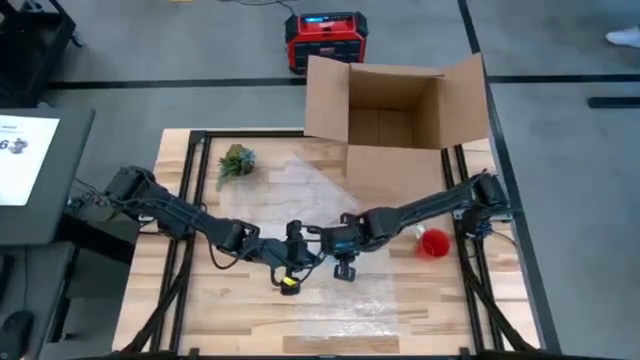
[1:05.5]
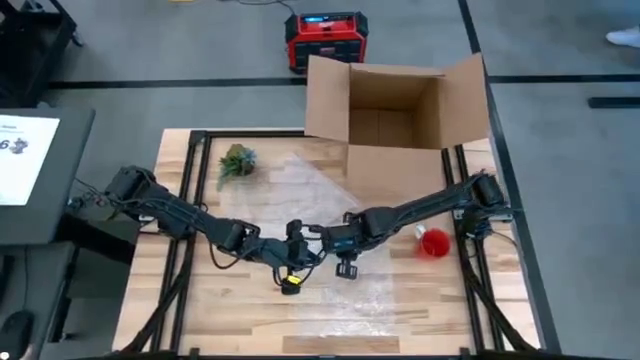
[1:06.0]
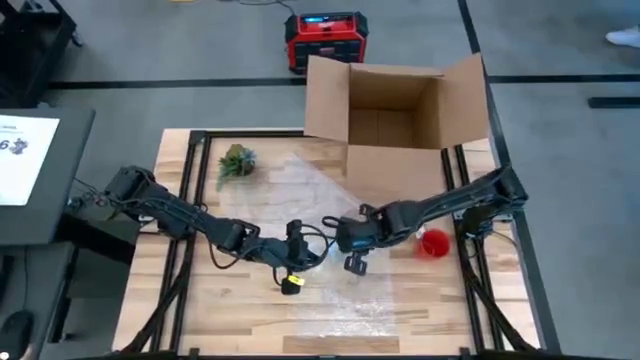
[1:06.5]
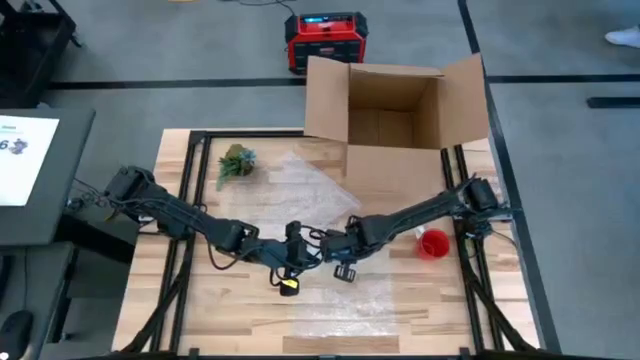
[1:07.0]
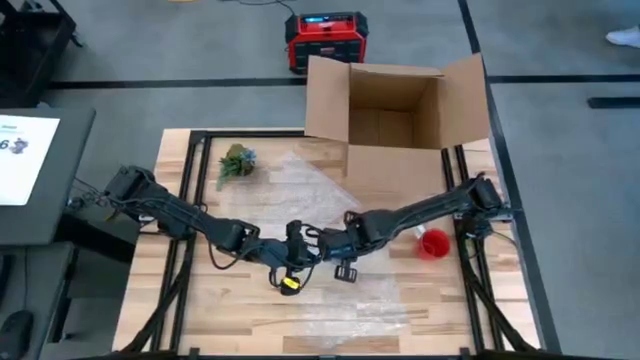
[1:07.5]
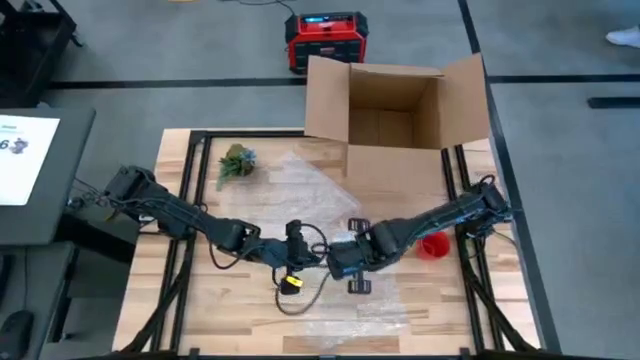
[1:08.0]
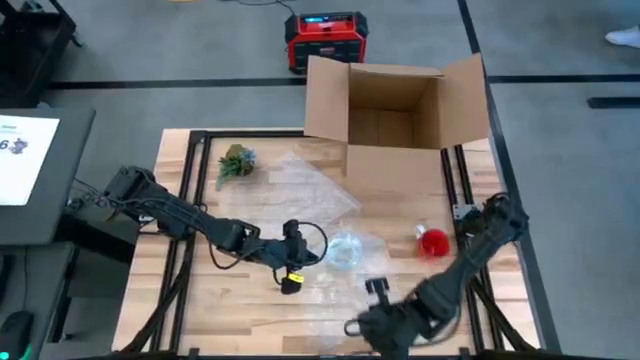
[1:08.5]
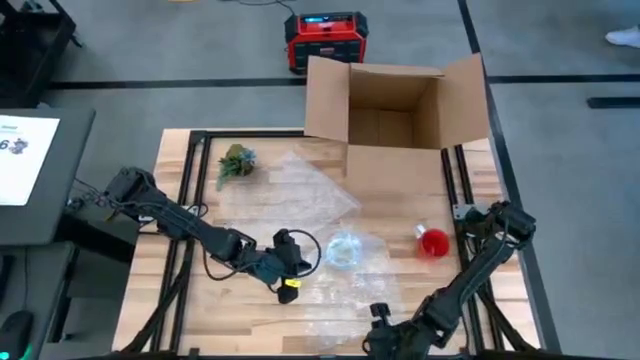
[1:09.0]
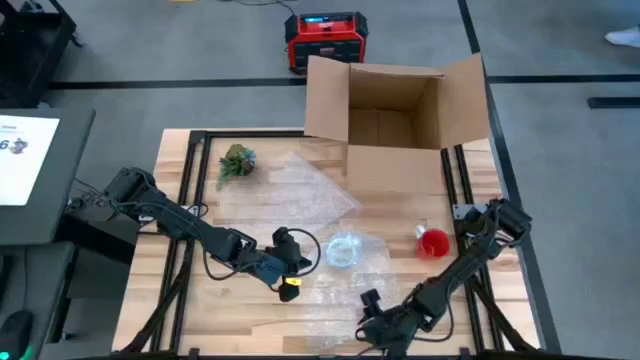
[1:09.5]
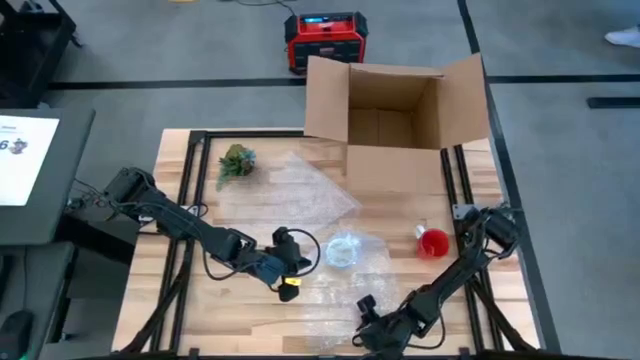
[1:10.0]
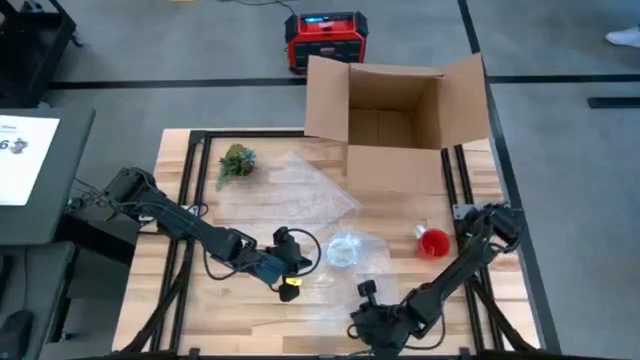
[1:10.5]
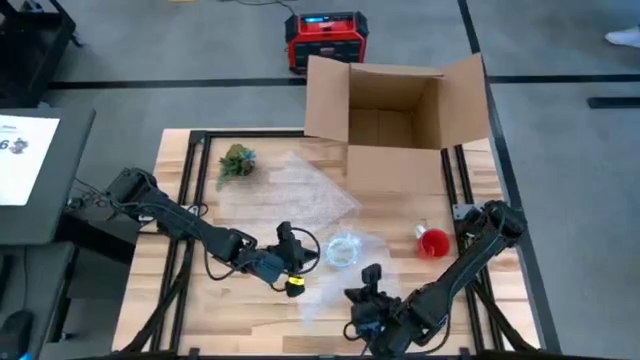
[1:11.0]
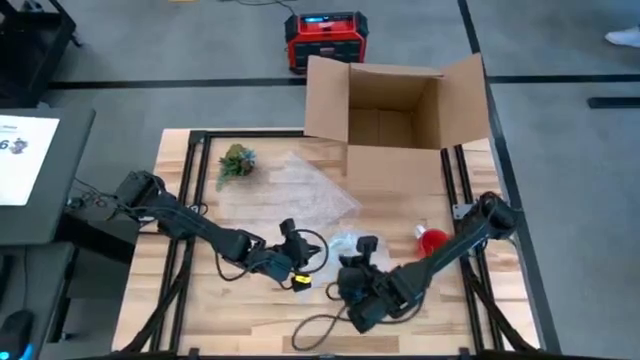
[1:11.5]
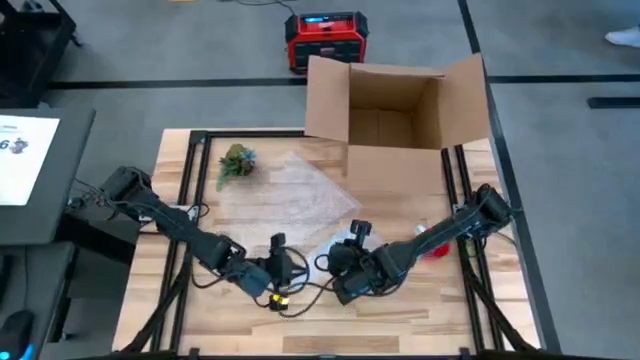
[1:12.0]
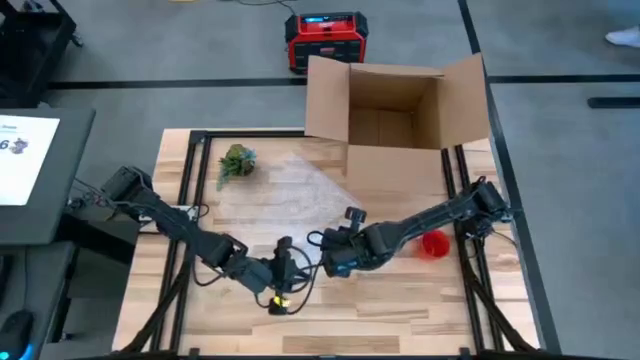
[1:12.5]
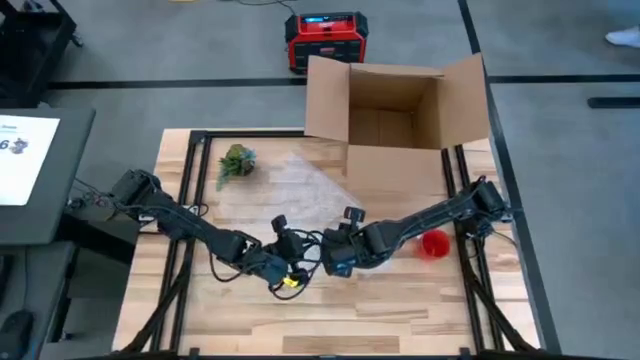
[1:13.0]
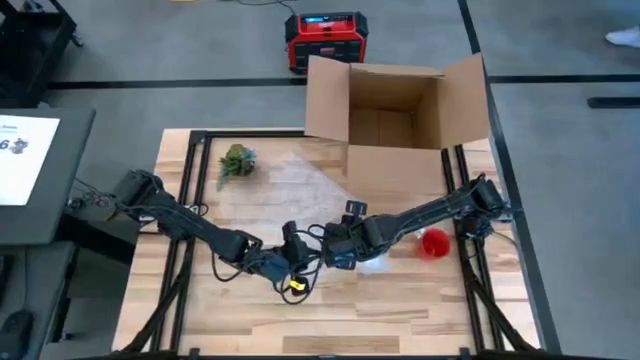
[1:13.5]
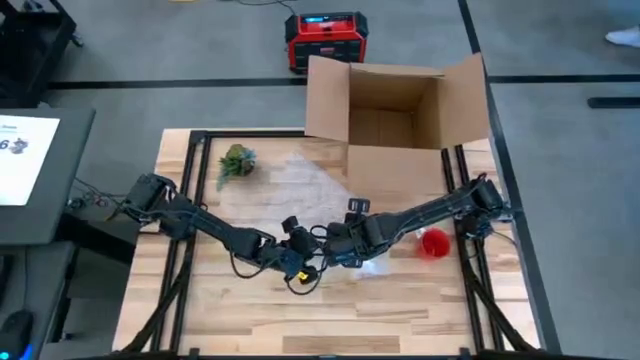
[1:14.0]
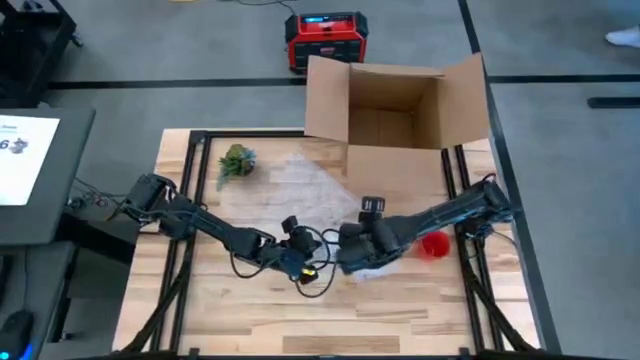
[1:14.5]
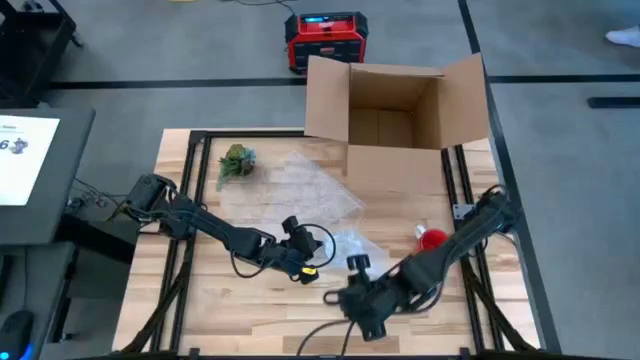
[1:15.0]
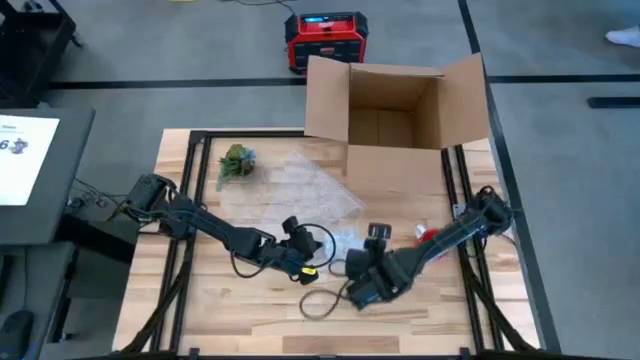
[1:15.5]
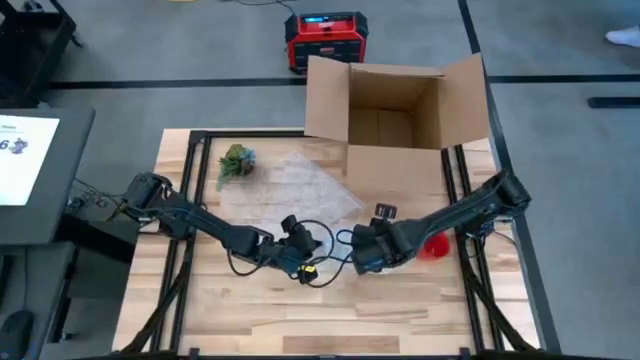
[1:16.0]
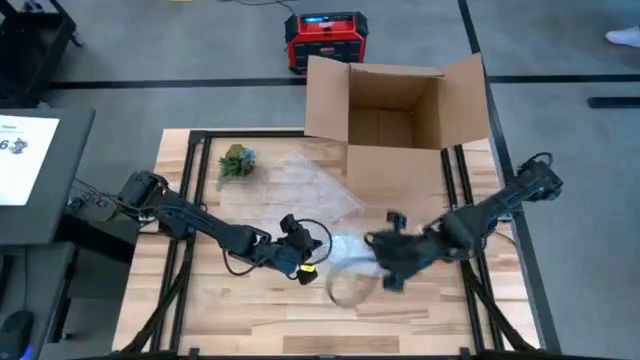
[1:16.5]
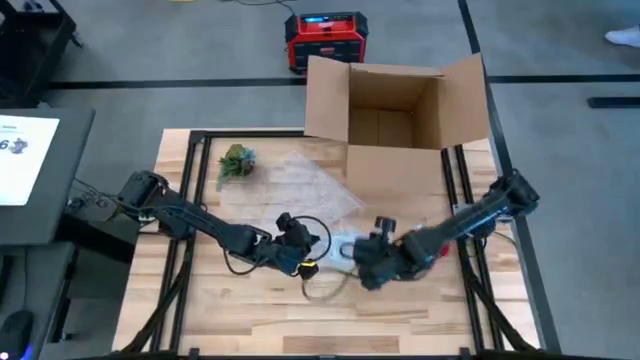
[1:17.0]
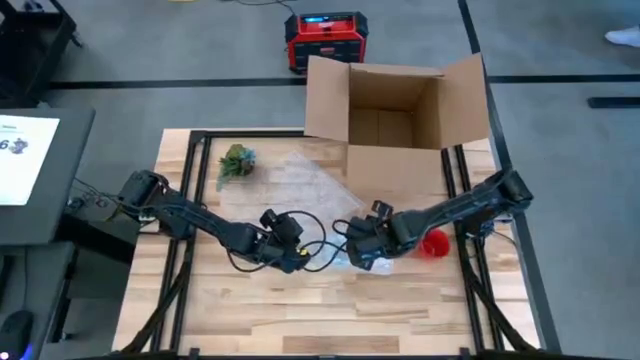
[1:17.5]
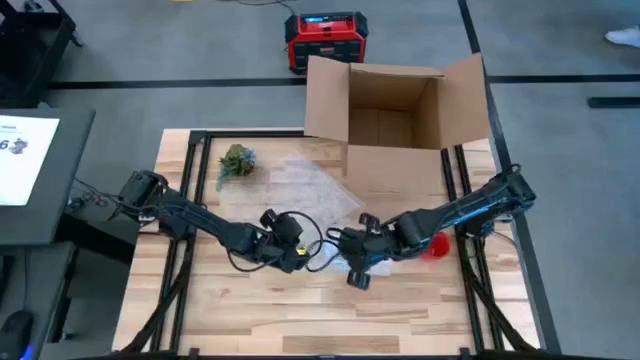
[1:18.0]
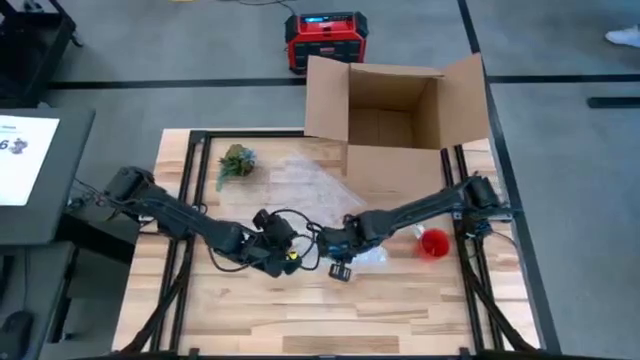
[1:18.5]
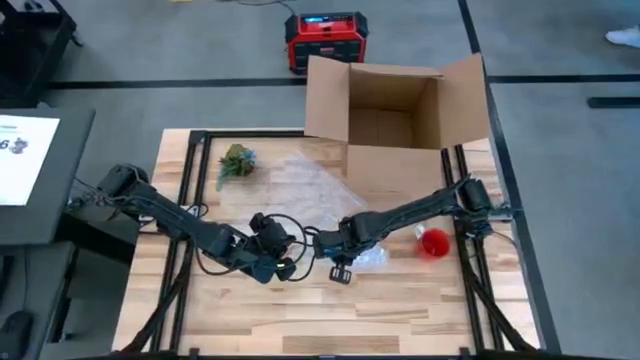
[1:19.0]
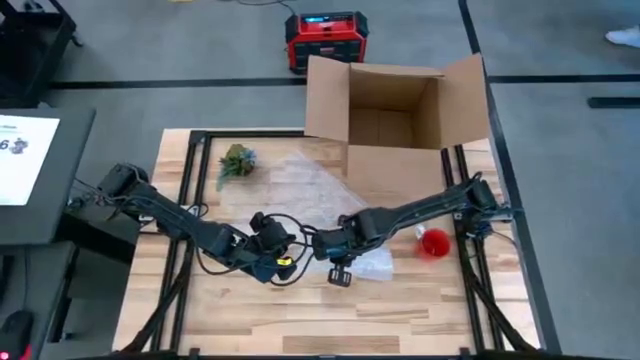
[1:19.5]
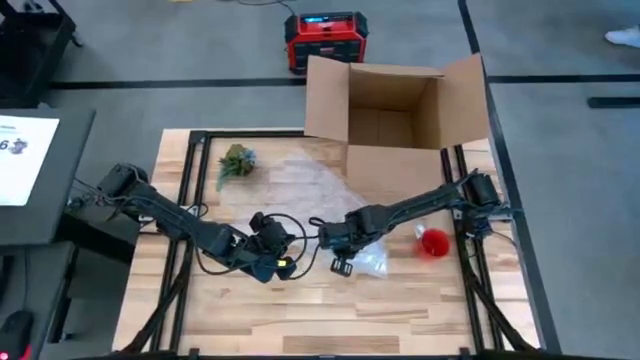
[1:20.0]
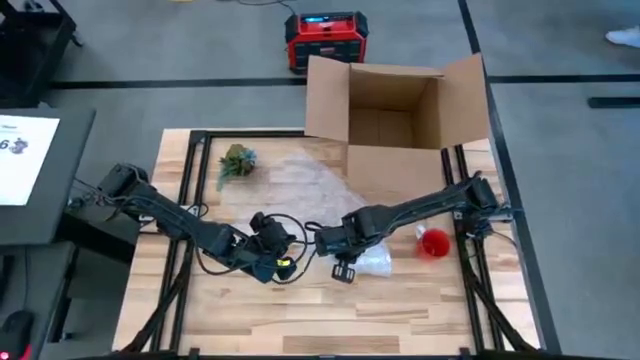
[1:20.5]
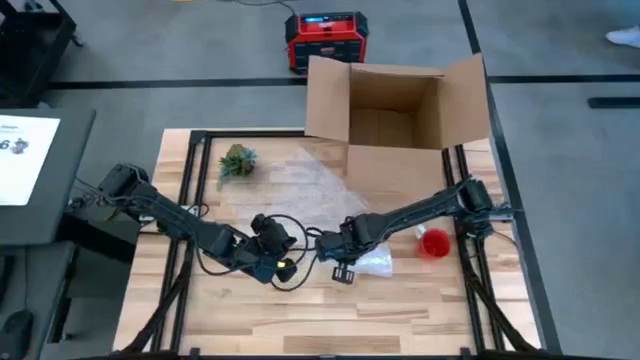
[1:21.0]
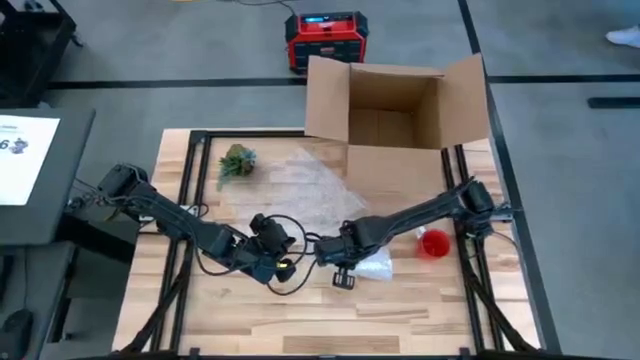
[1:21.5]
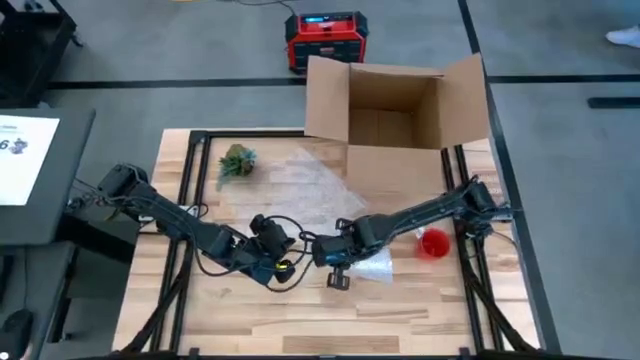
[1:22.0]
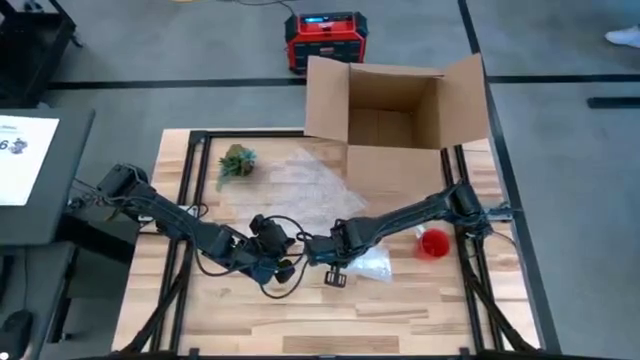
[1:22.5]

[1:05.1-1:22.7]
Task: wrap mug
Wrap the blue patterned mug with the transparent bubble wrap

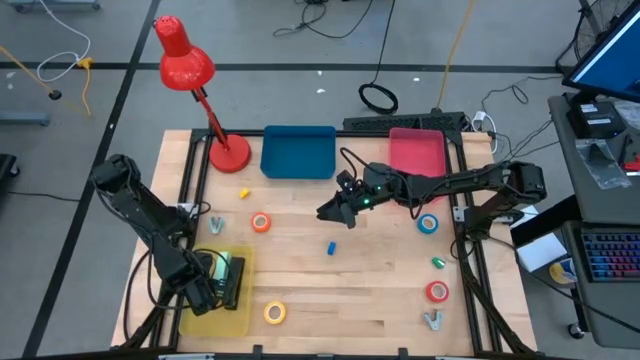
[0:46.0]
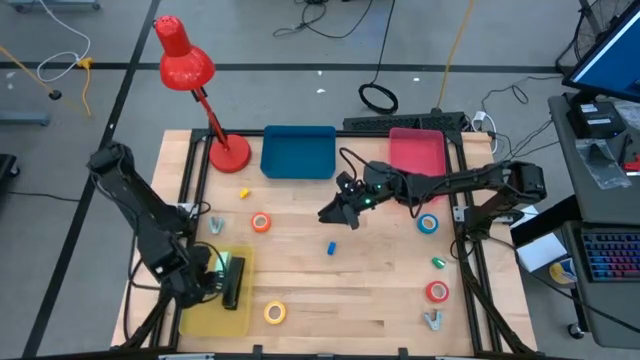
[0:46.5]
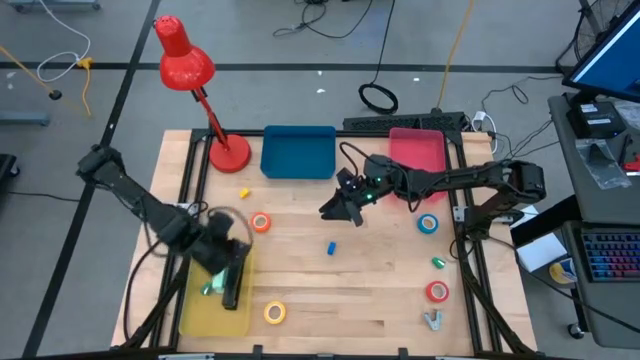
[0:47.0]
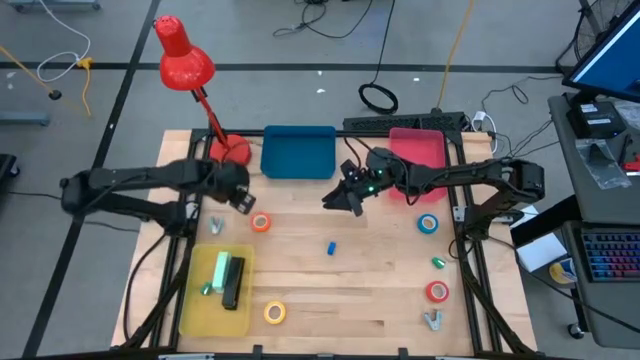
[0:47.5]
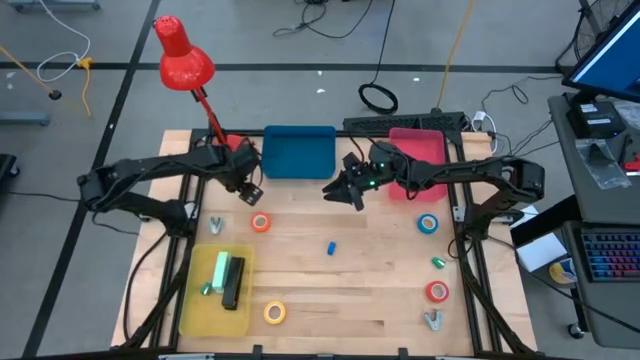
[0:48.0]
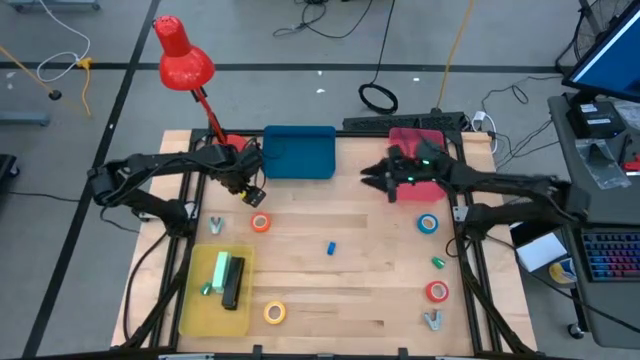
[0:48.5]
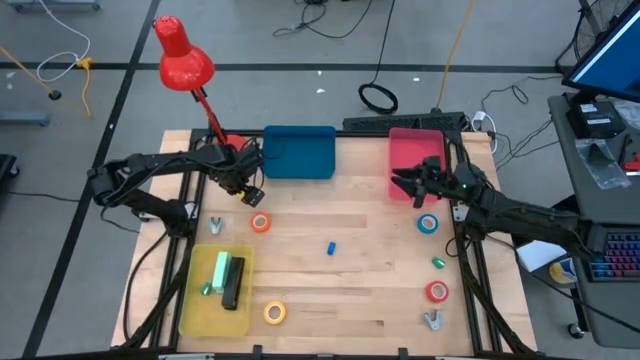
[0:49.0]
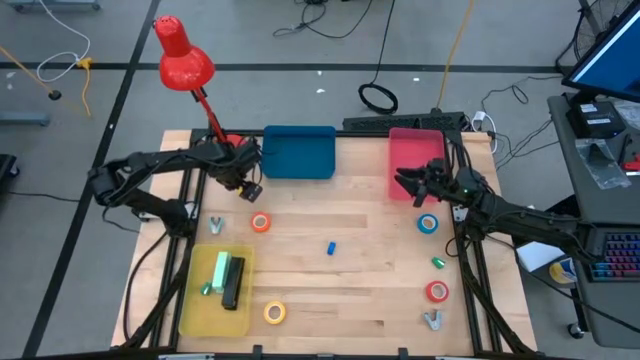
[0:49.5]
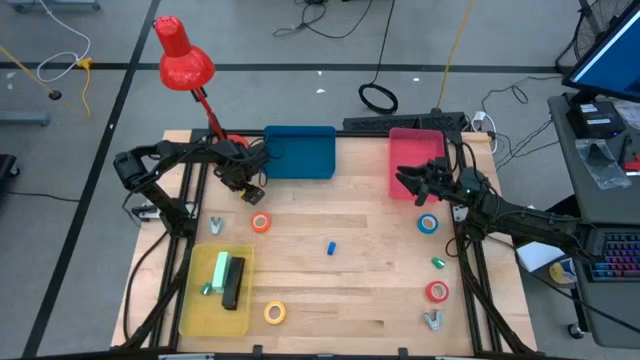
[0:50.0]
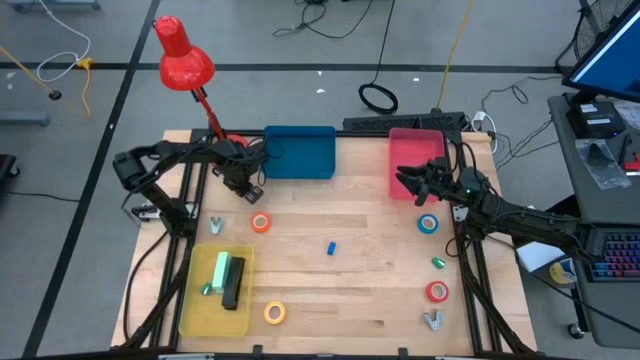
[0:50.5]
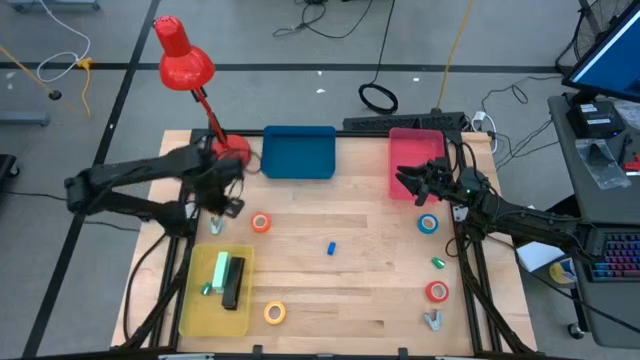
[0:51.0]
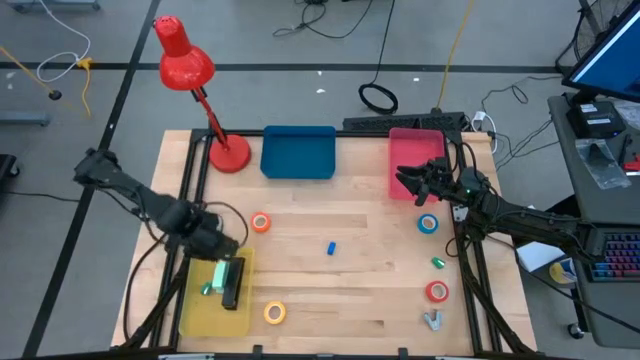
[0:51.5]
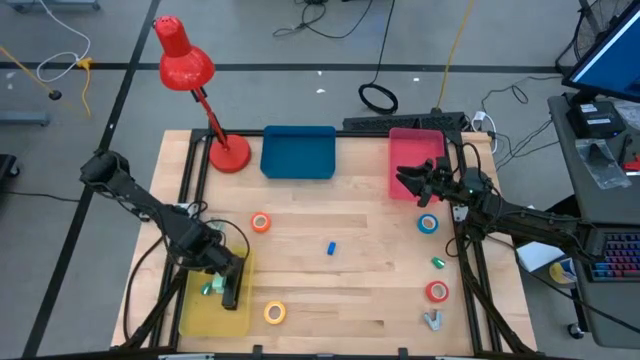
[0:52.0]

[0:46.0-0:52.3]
Task: Pick and place Stapler, Stapler remover, tape
Put the yellow stapler into the yellow bin
